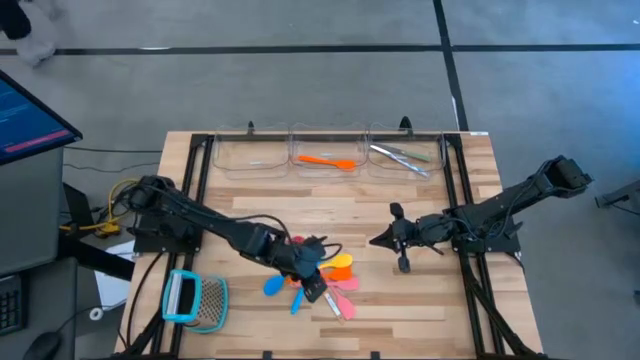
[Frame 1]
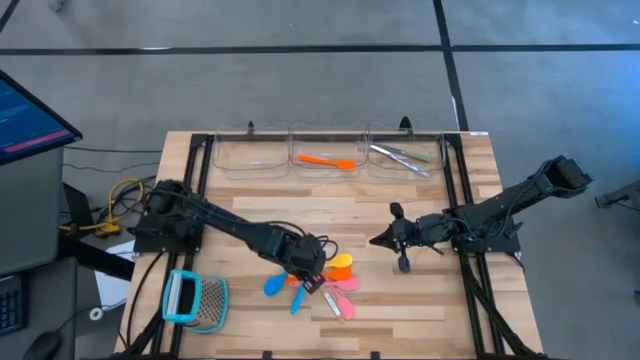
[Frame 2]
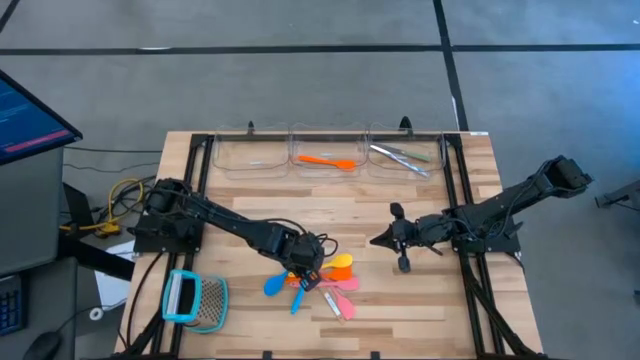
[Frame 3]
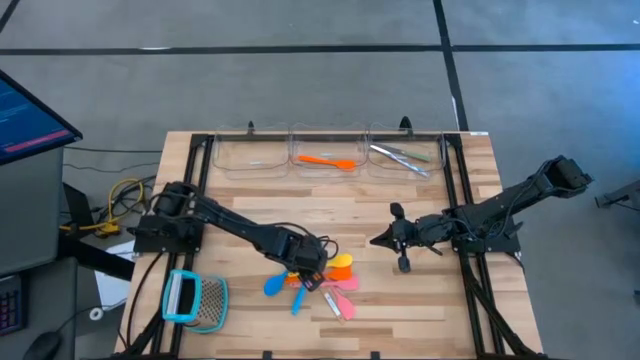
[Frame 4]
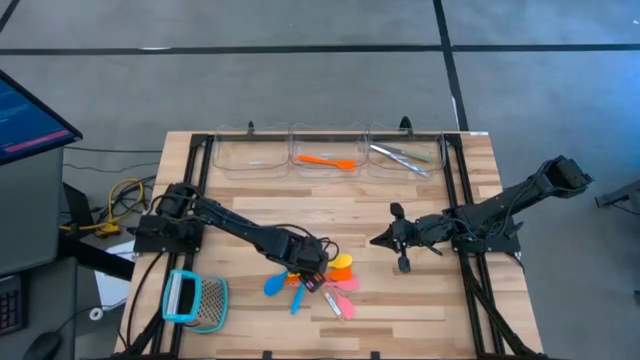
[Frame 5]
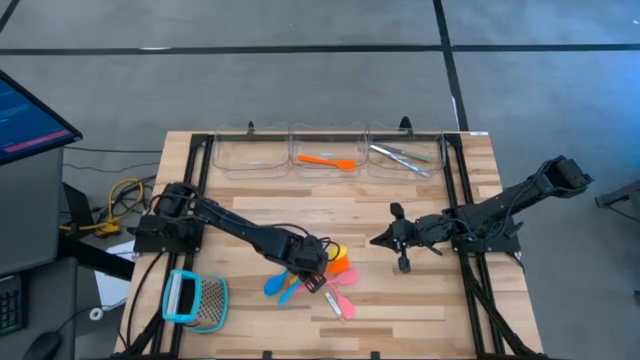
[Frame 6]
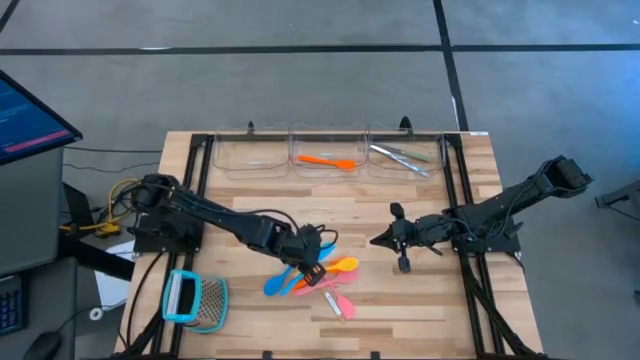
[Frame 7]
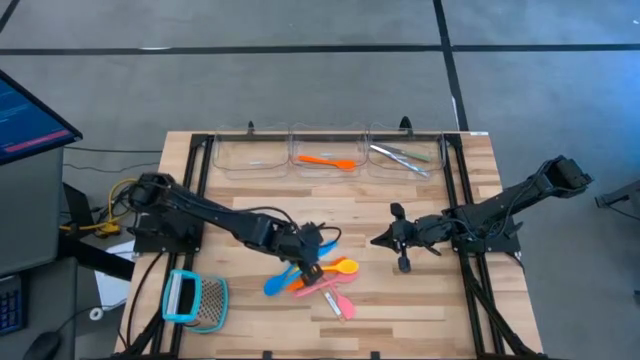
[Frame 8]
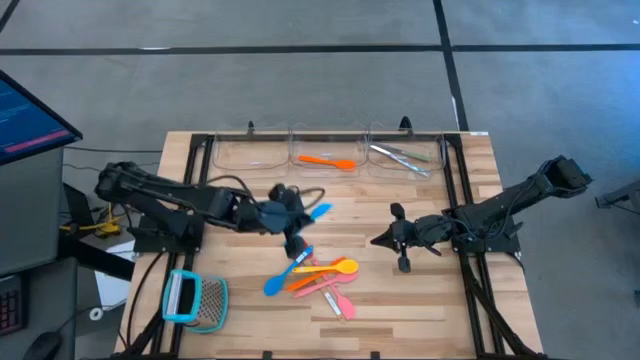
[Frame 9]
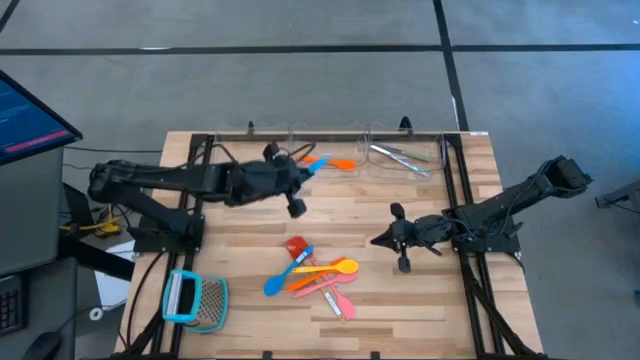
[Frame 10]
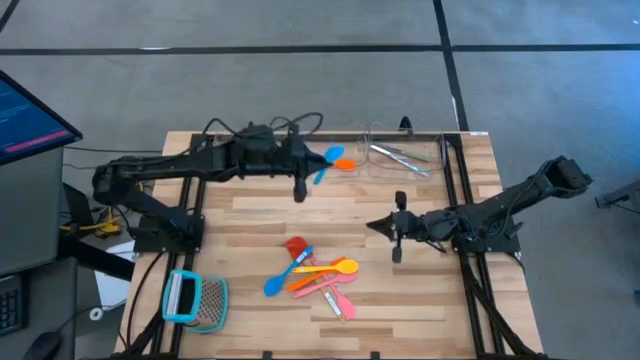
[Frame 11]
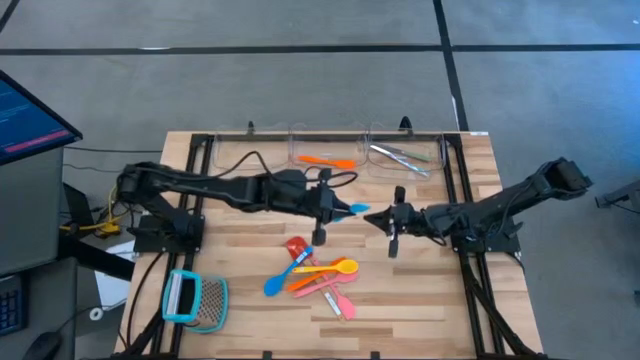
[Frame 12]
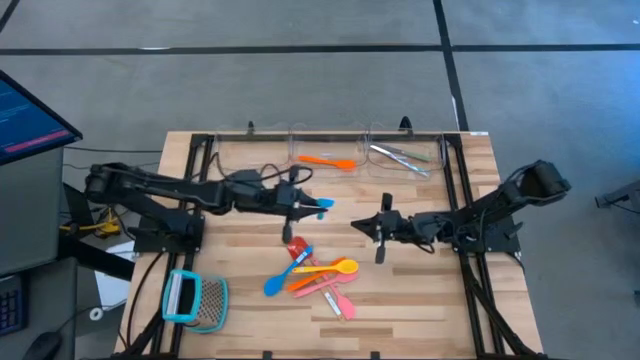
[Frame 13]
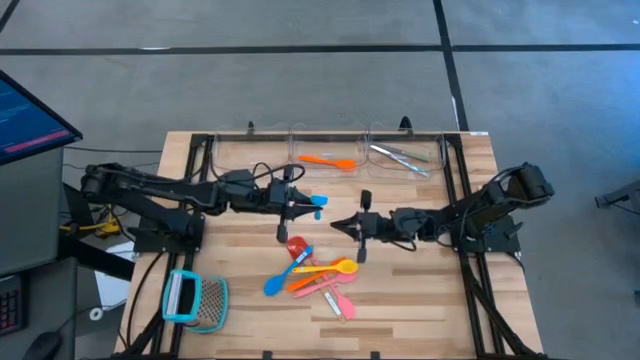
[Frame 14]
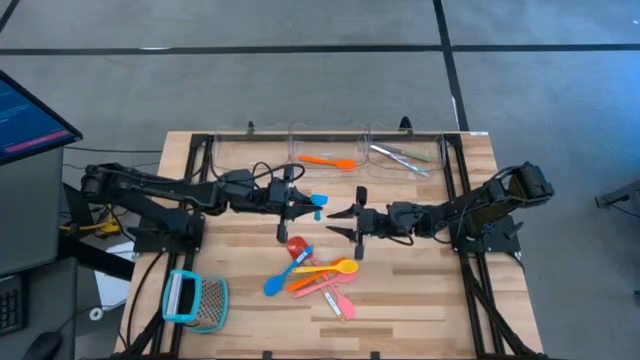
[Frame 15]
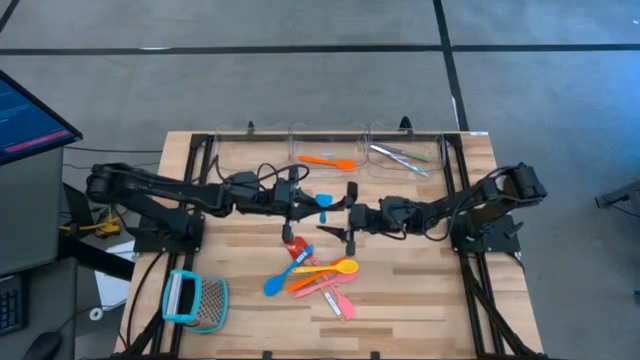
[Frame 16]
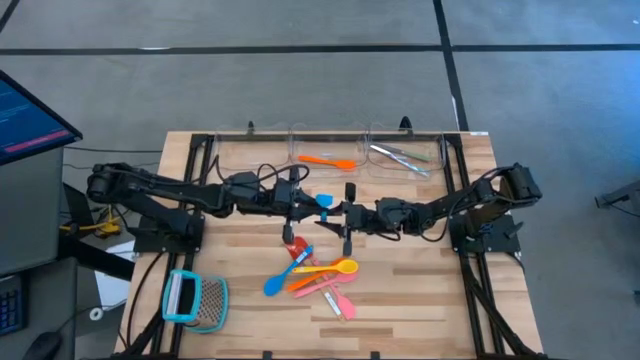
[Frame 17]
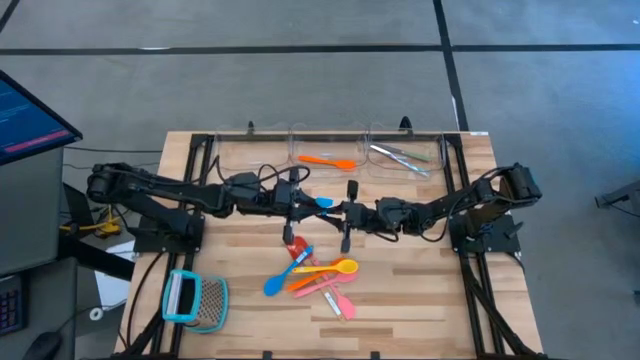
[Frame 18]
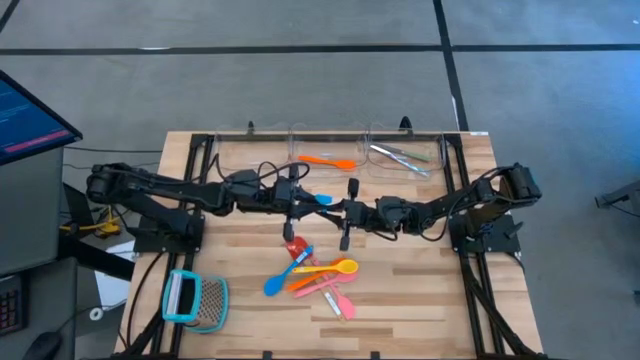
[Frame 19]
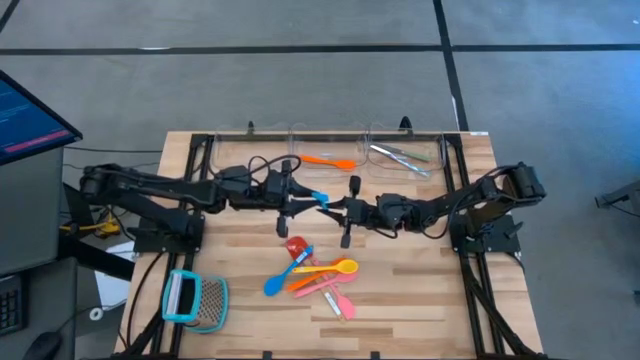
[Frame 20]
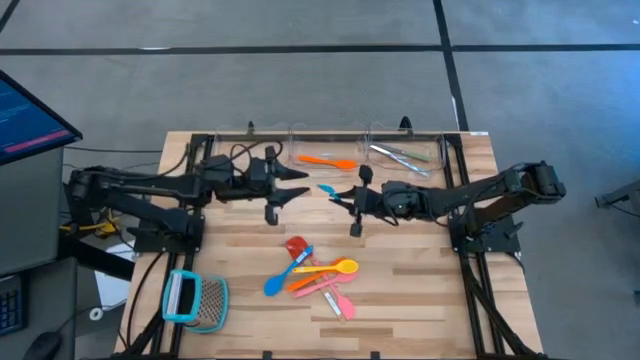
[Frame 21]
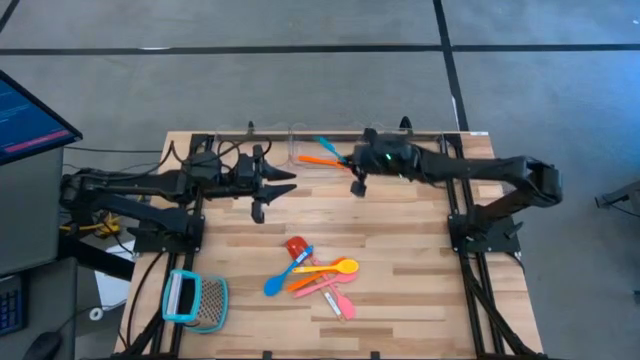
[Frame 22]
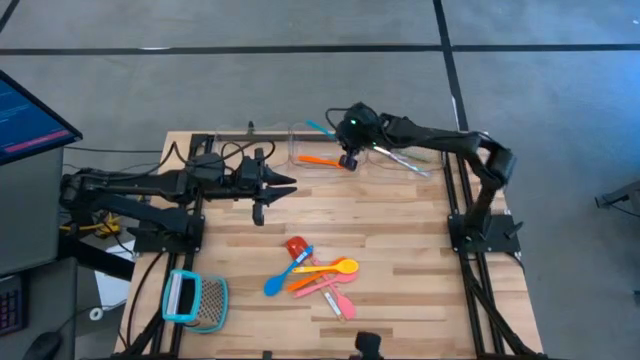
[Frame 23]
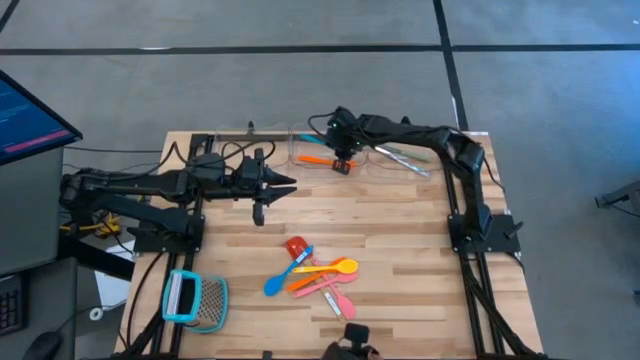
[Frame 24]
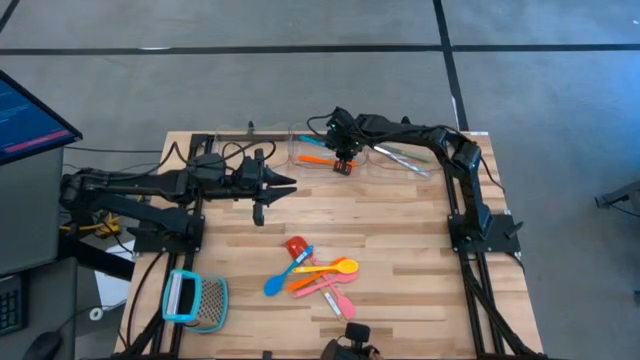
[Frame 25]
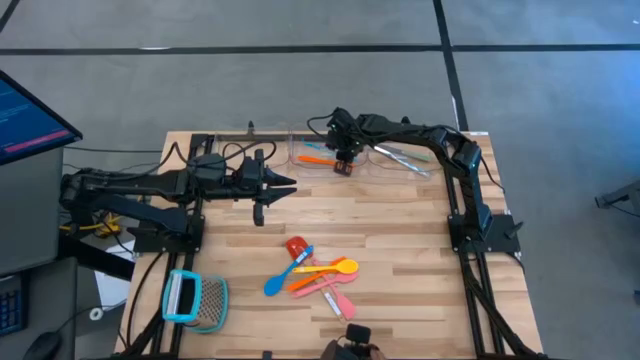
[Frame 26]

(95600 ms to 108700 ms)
Task: Pick & Place Kitchen Items
Put the blue spatula into the middle transparent bin

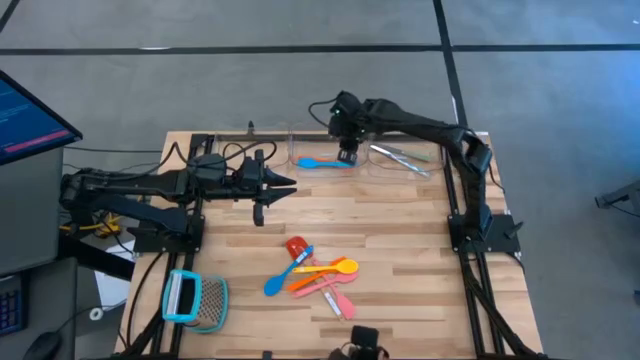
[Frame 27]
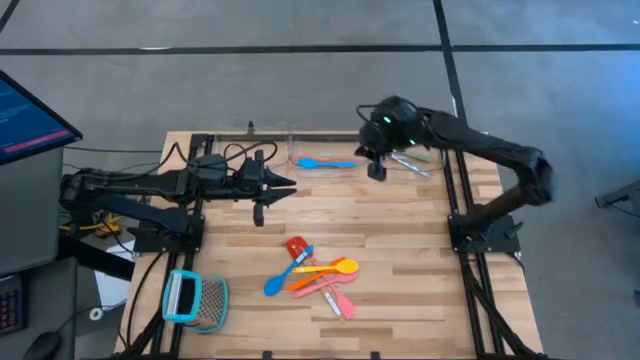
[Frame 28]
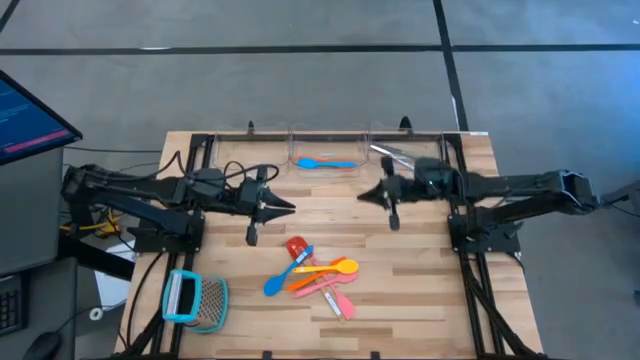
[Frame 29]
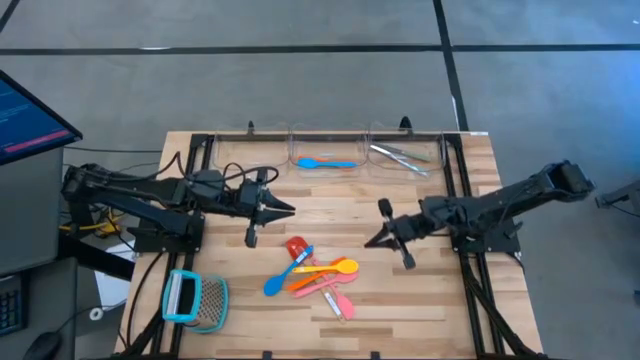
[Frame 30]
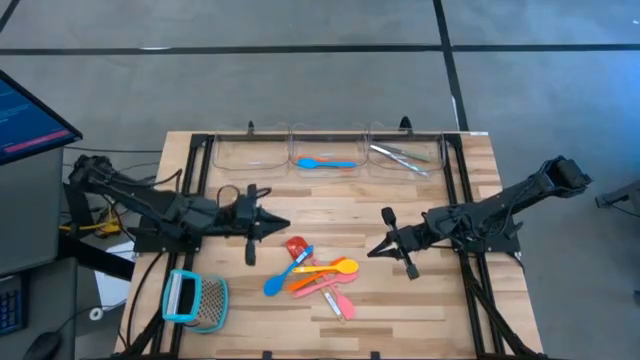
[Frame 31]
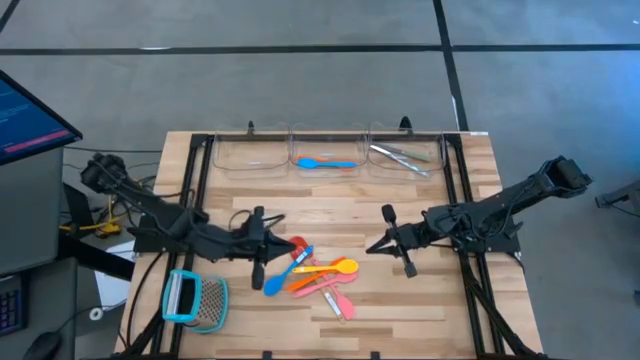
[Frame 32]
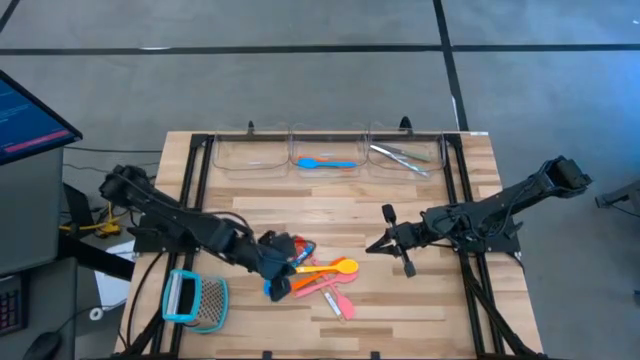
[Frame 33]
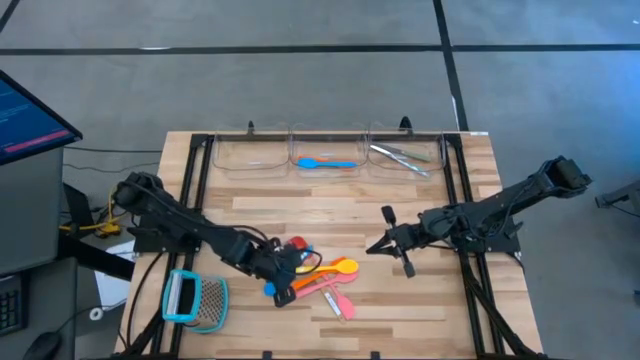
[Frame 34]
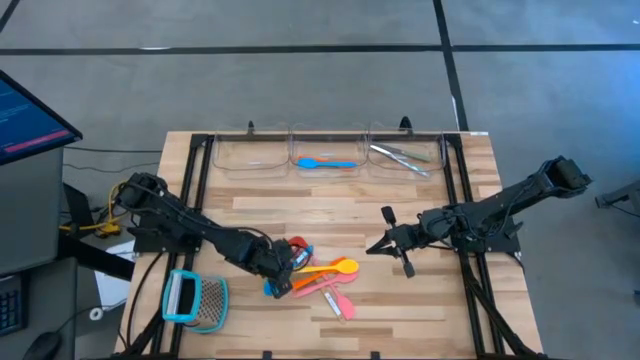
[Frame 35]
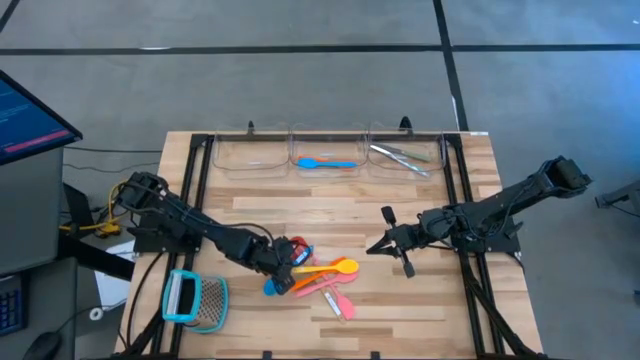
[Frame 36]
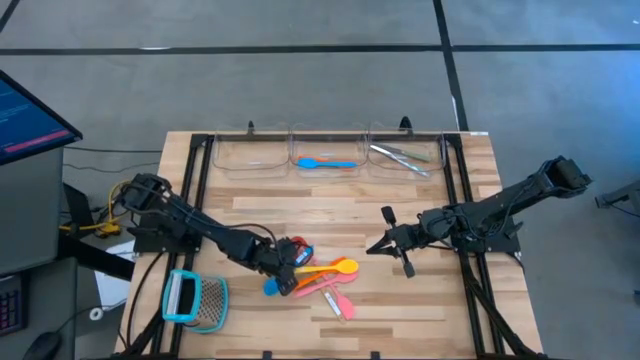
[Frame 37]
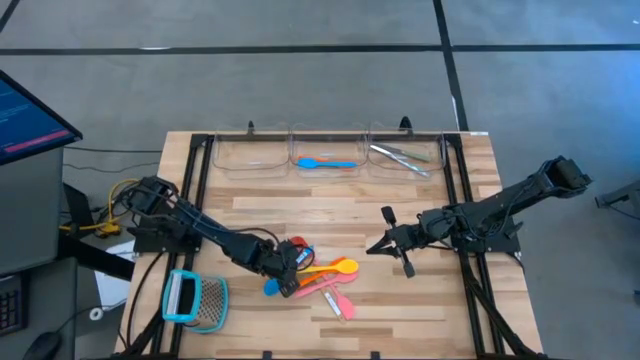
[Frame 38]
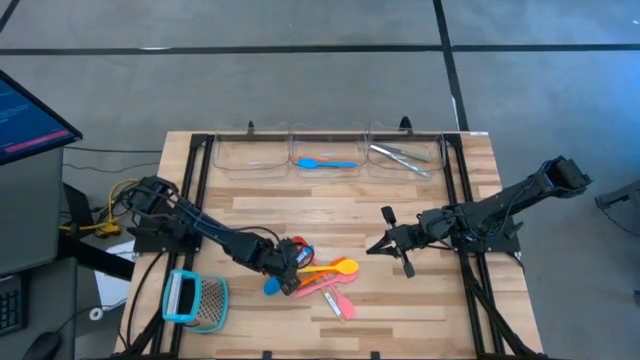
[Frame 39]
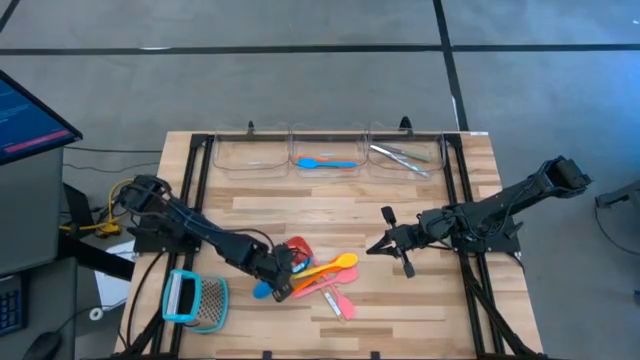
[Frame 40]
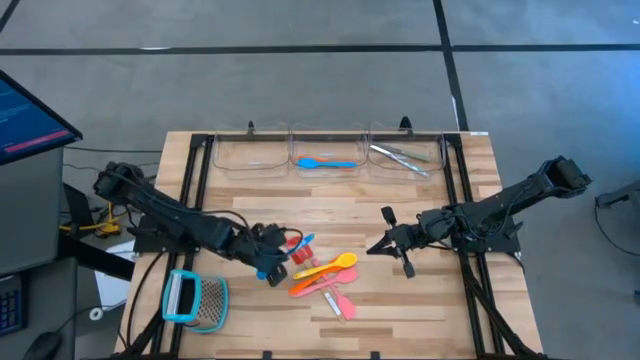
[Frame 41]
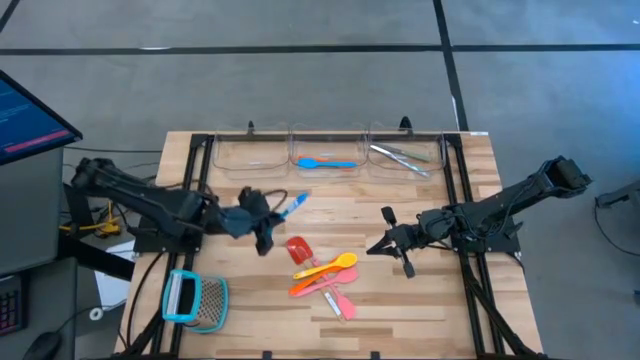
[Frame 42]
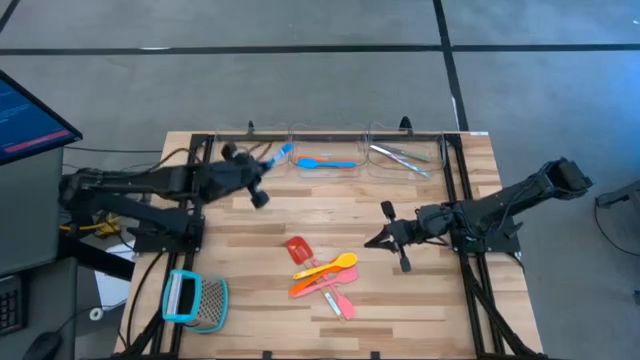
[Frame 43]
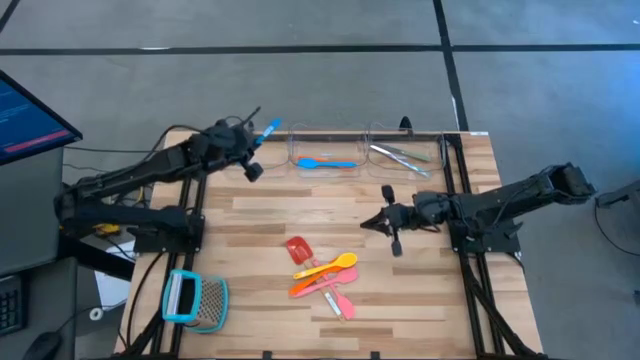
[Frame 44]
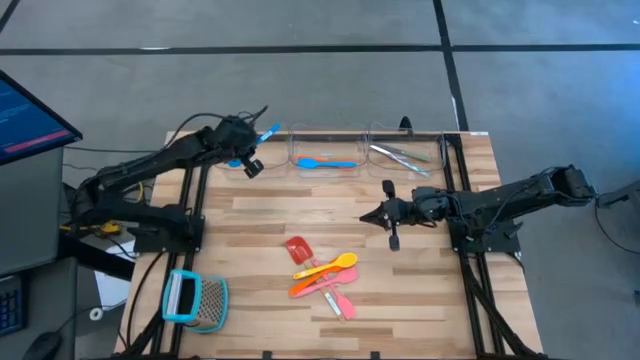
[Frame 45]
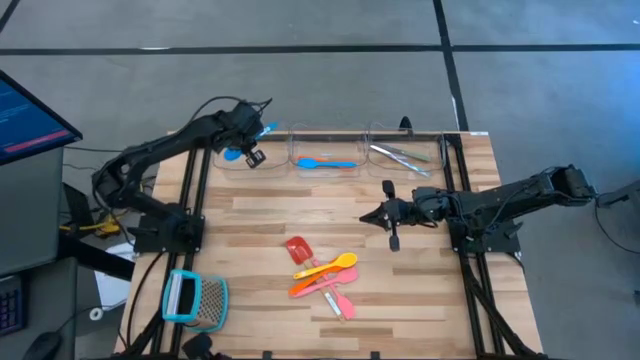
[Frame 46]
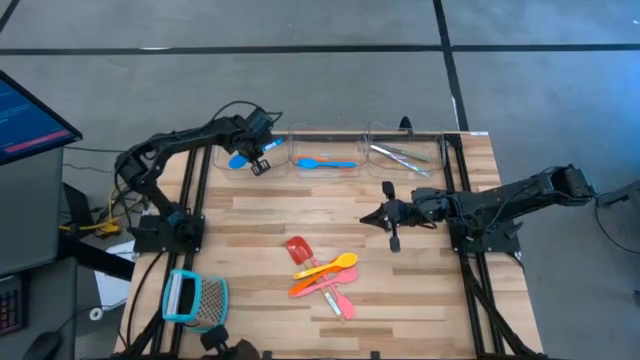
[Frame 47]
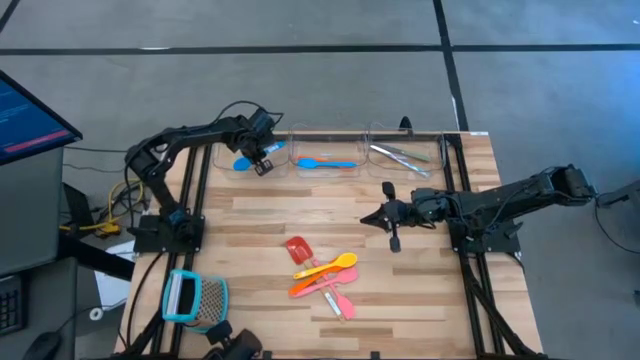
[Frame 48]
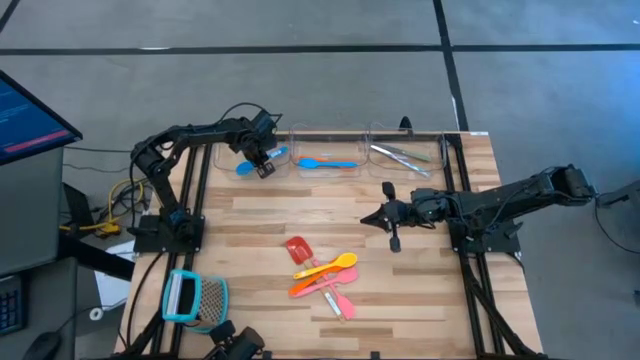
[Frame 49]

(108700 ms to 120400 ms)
Put the blue serving spoon into the left transparent bin
